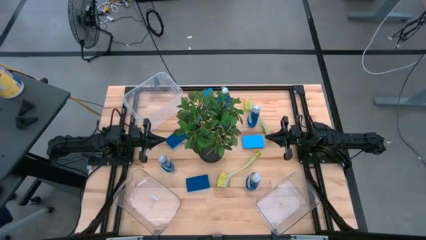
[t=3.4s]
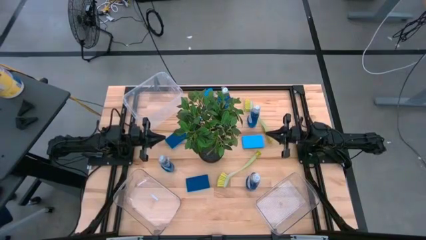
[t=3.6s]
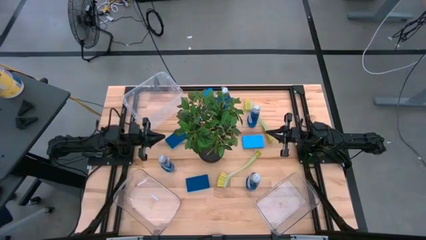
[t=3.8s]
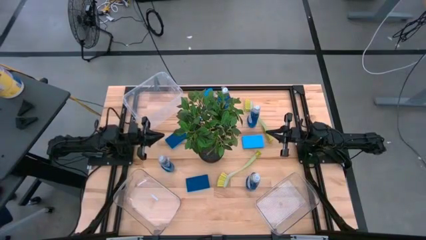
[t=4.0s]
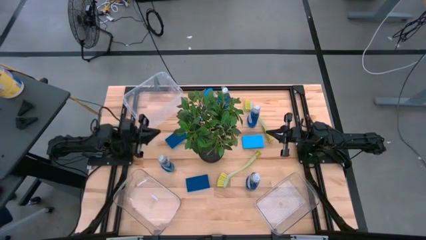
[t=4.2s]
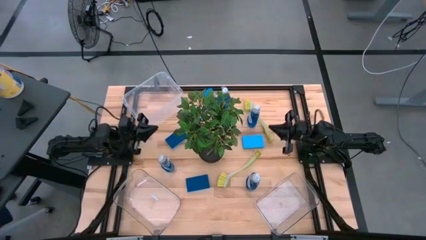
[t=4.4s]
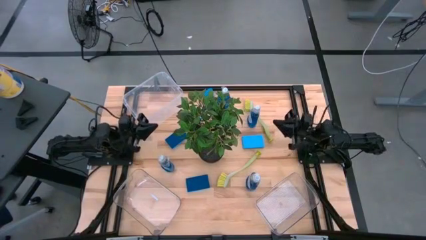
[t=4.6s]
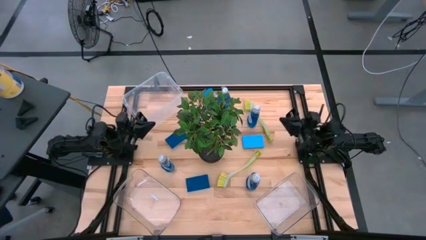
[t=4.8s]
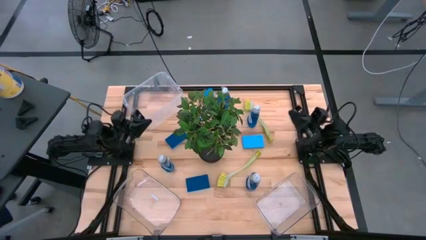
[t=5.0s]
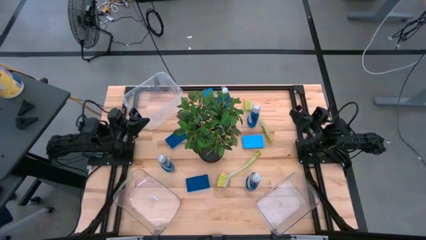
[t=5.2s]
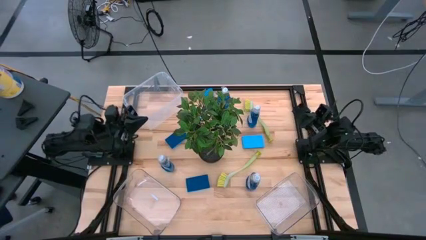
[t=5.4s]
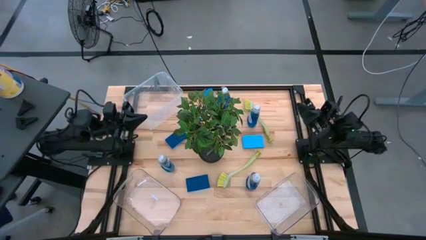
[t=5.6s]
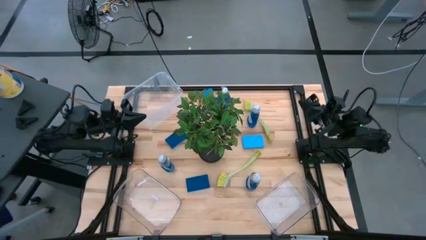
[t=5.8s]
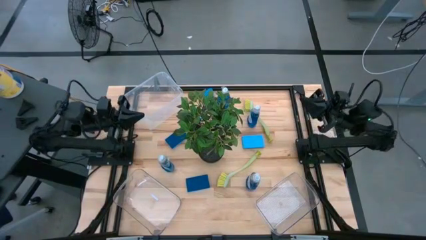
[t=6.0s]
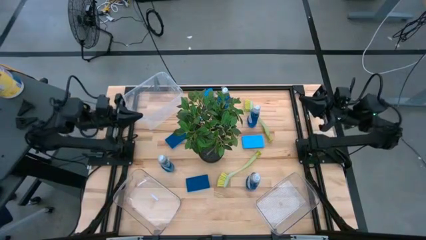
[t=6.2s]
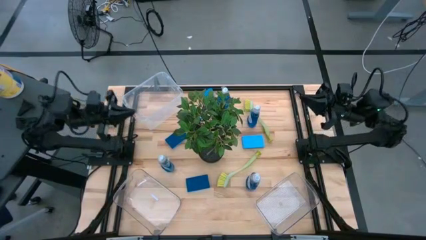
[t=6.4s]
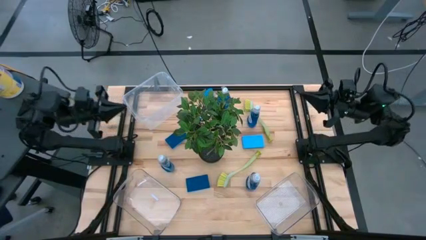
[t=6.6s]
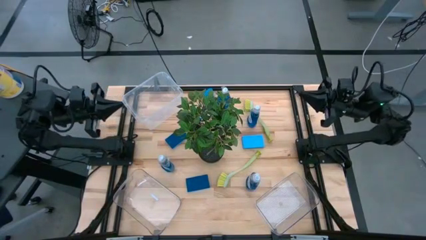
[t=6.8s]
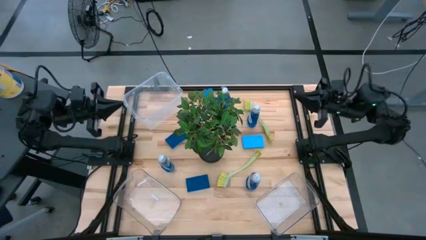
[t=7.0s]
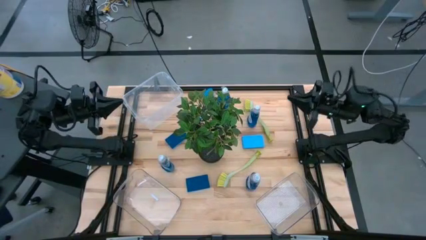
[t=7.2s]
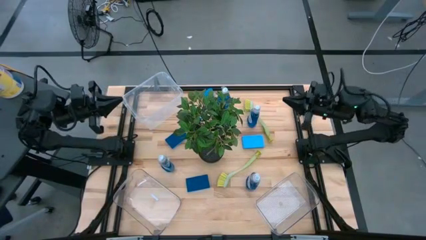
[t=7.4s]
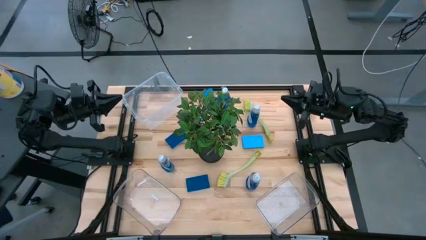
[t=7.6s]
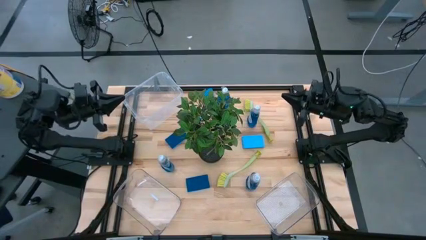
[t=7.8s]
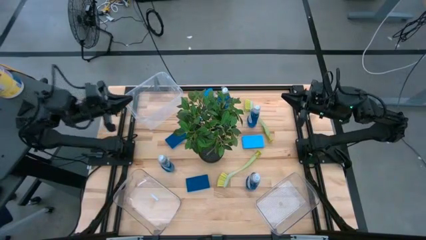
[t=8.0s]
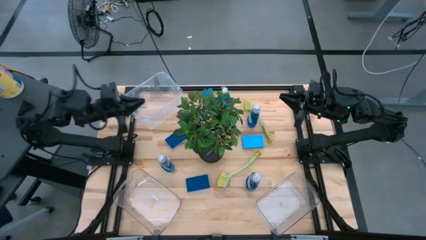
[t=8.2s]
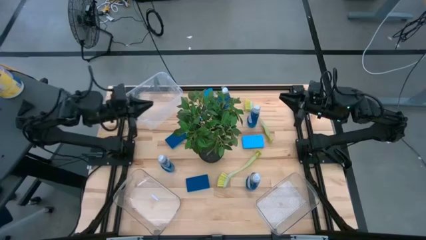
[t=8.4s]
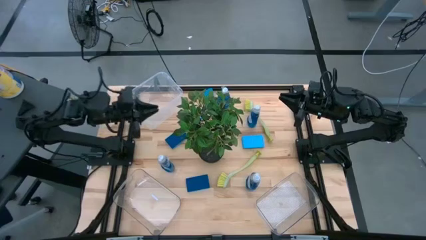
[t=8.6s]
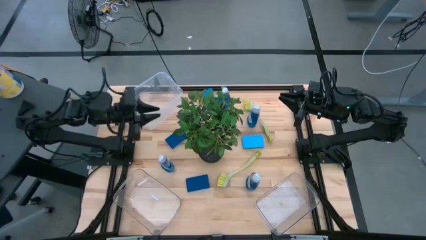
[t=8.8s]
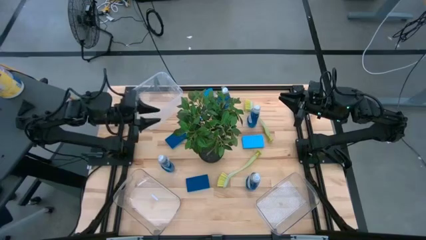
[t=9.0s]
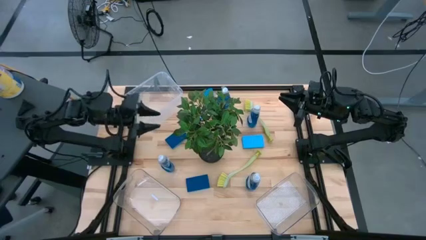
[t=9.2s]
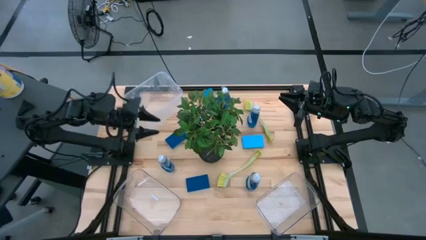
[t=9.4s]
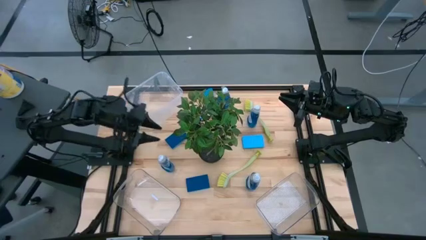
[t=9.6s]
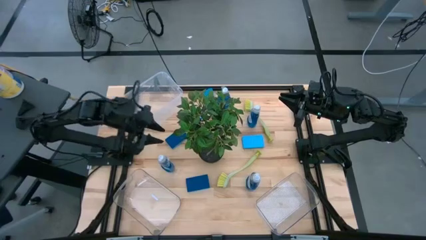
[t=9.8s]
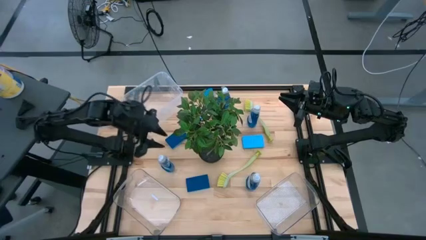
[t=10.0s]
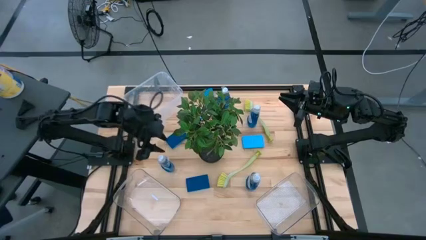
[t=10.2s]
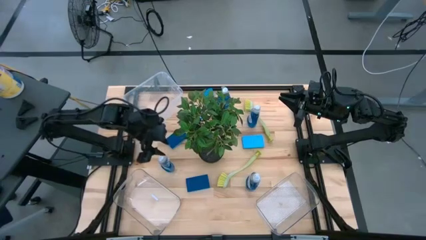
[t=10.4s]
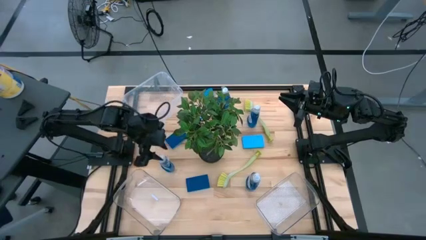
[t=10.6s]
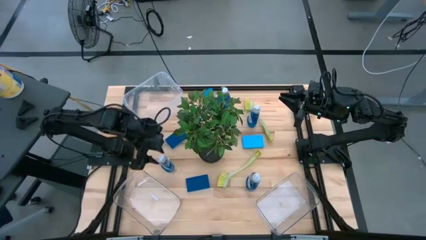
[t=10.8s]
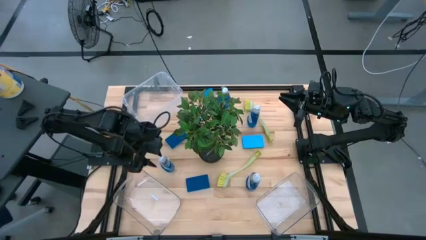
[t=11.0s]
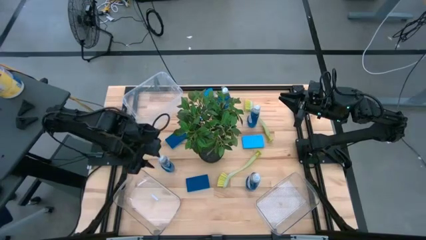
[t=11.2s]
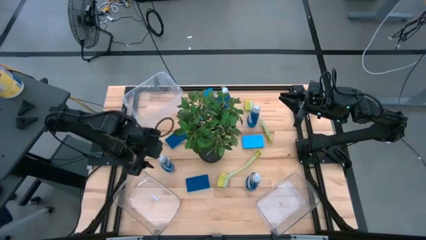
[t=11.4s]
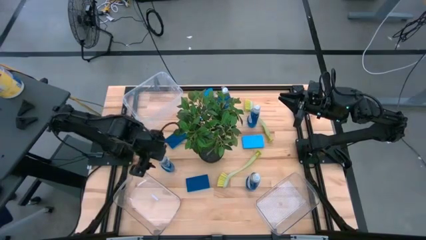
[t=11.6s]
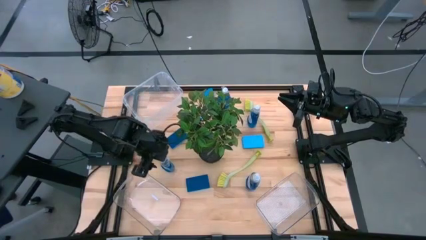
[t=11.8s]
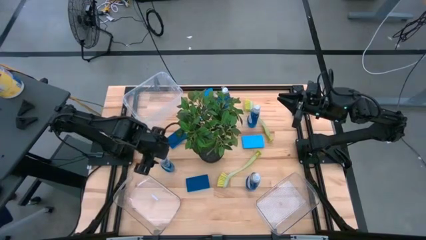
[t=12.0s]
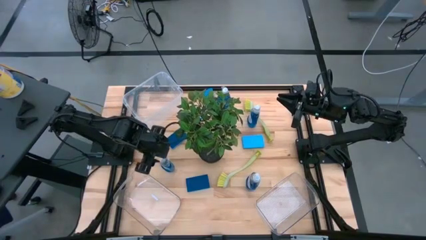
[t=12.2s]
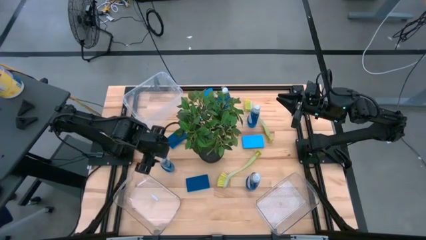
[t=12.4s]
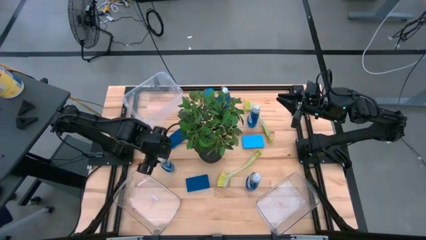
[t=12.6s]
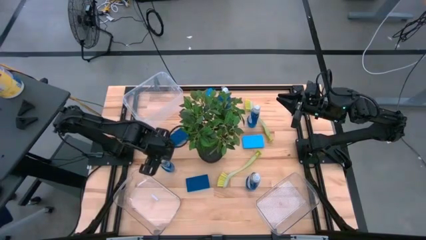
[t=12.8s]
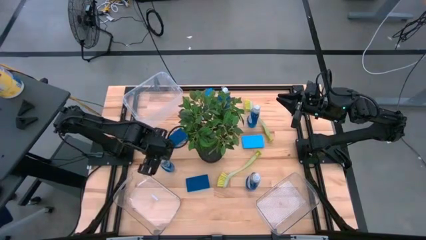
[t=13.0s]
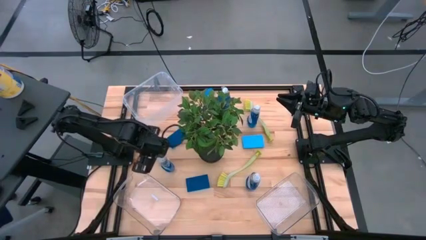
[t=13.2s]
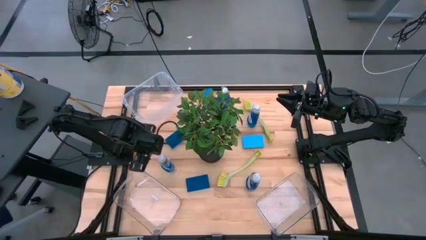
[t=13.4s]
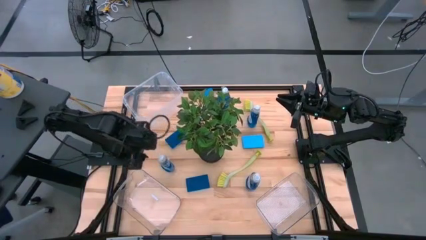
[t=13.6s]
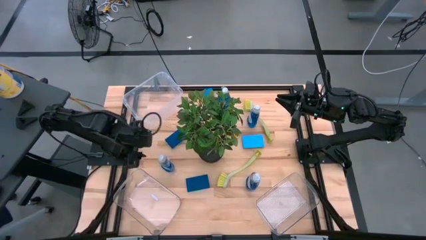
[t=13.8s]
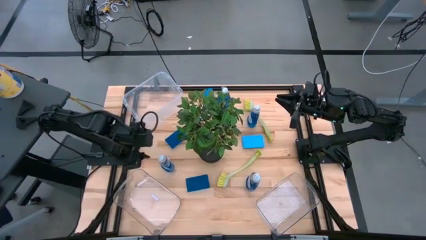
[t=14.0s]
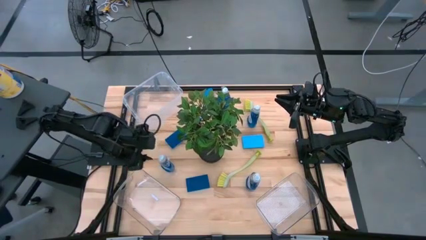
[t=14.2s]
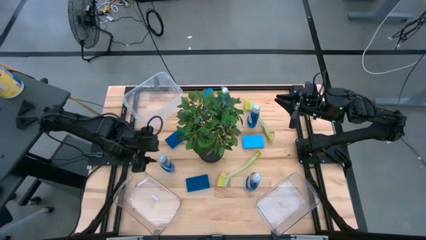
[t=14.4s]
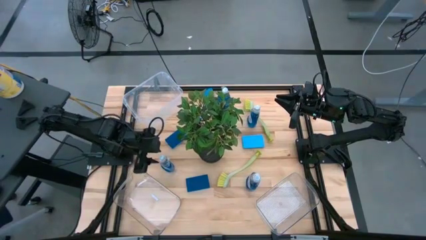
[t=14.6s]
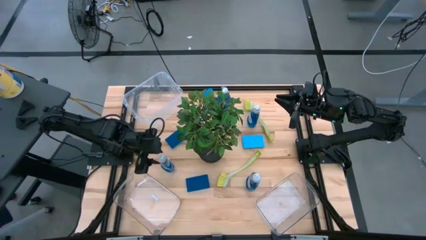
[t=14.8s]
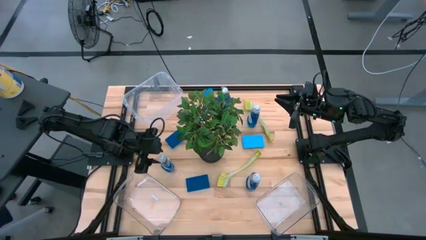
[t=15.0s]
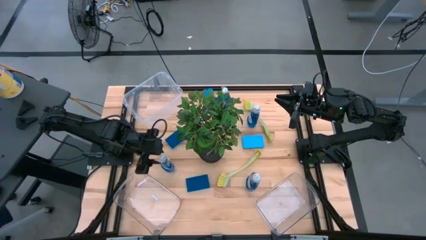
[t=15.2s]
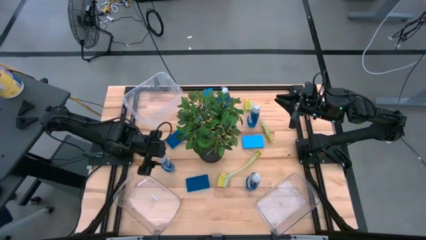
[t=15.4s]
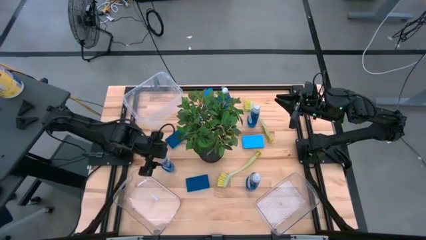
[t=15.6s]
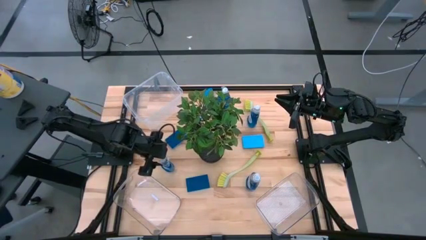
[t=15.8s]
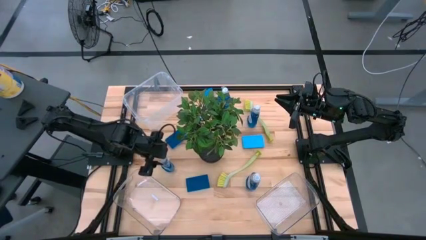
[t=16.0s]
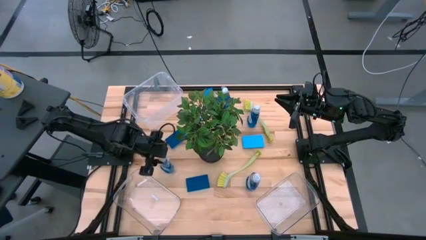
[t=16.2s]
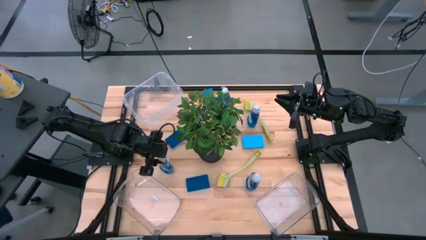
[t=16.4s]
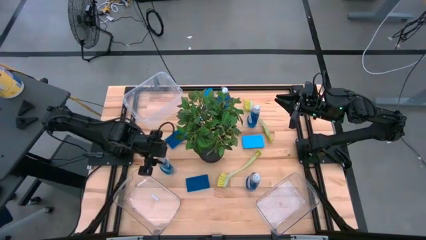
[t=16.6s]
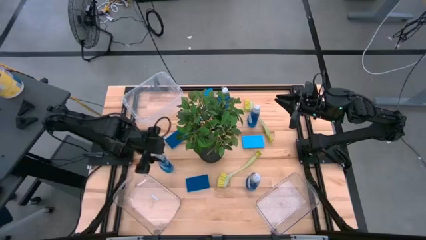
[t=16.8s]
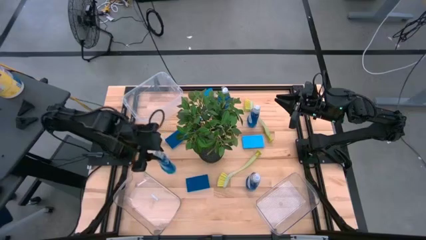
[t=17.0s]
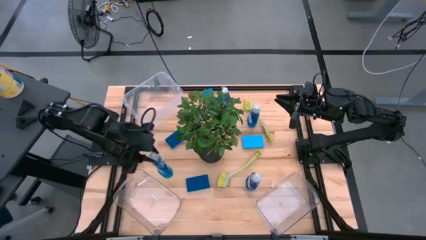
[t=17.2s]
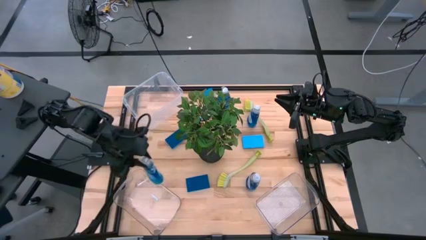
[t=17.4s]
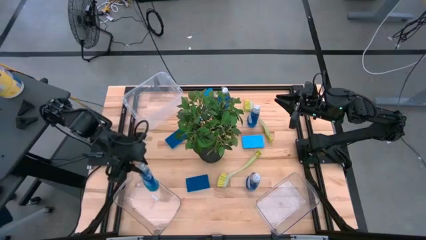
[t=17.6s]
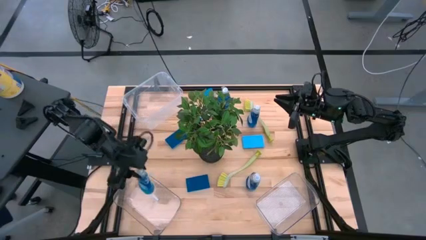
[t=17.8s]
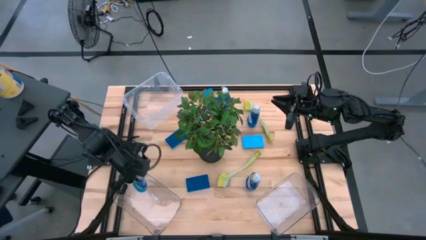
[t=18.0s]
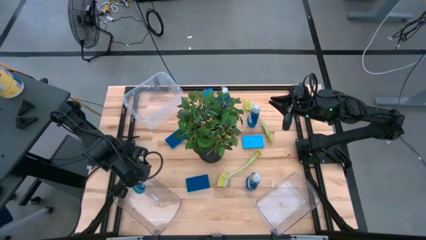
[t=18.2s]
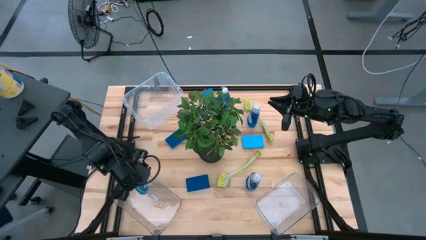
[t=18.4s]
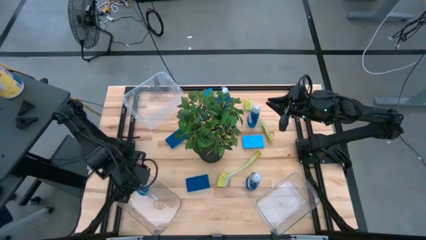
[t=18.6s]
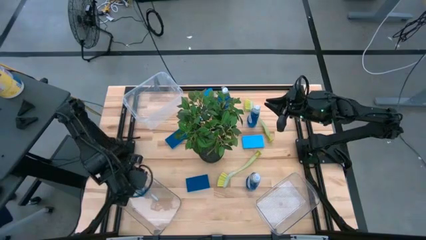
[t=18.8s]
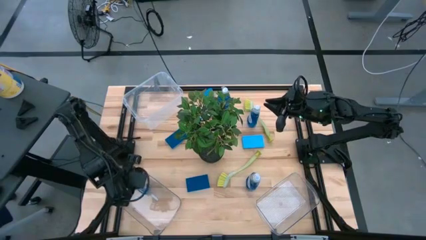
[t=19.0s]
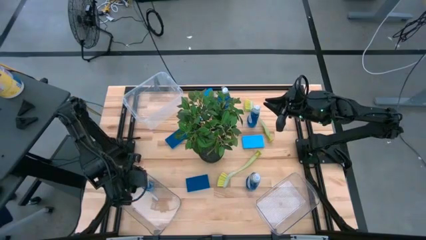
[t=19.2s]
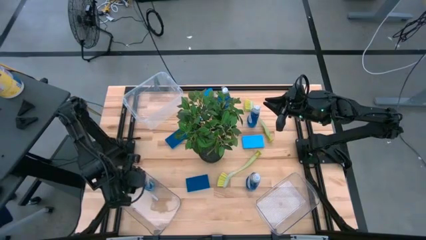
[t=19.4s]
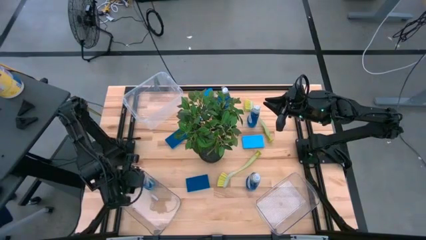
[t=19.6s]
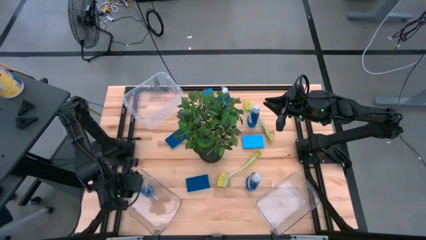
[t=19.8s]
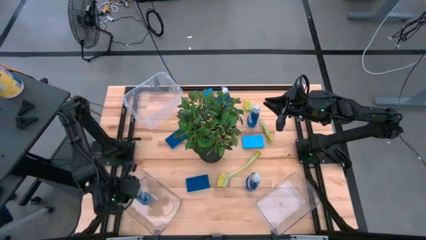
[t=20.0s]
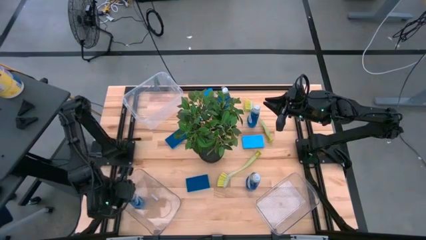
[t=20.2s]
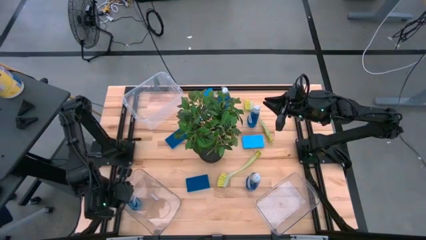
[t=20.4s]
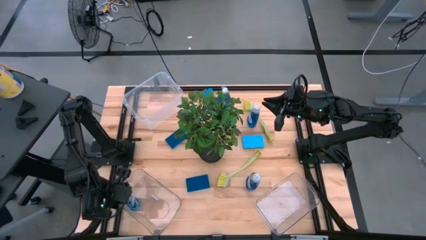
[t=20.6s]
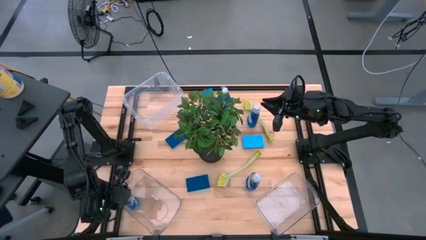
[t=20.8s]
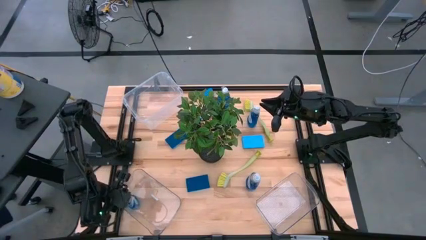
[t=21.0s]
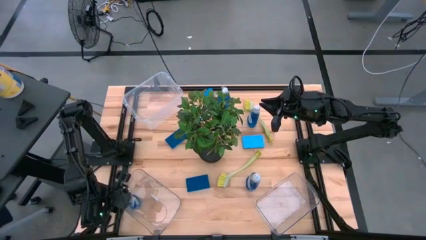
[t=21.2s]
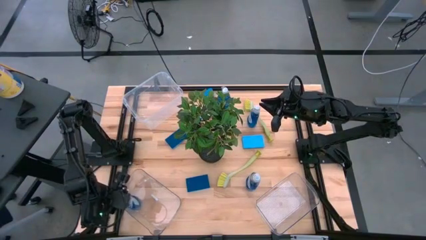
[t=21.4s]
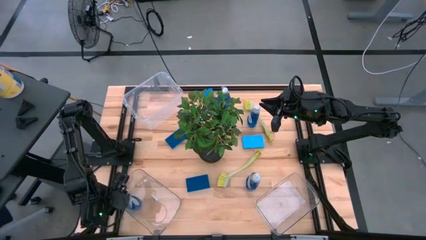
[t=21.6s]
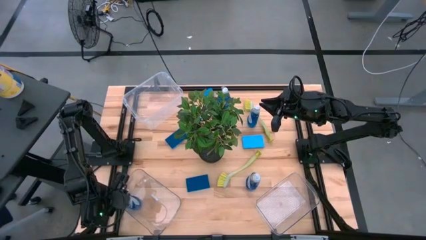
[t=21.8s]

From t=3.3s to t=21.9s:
Task: Pick & Place Kitchen Sink Supplies
Put the blue liquid soap bottle into the bottom left transparent bin
